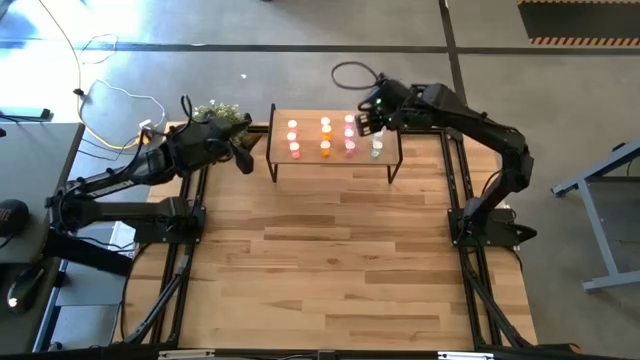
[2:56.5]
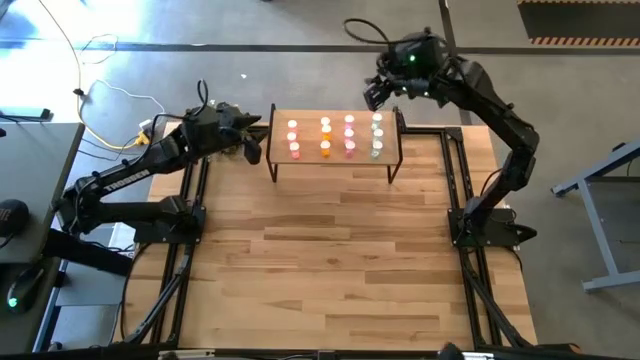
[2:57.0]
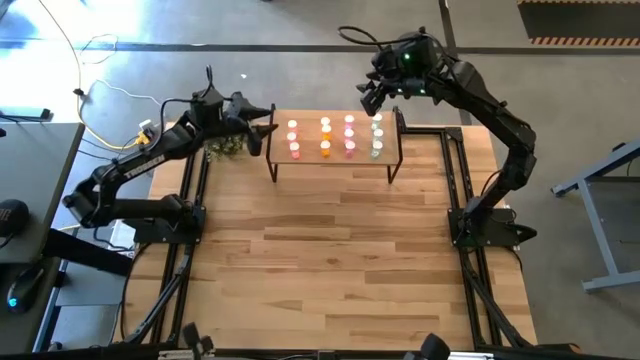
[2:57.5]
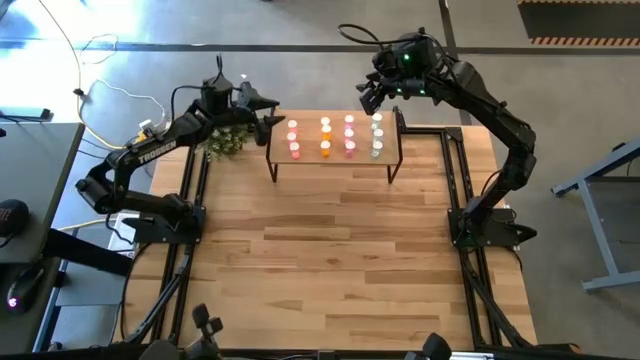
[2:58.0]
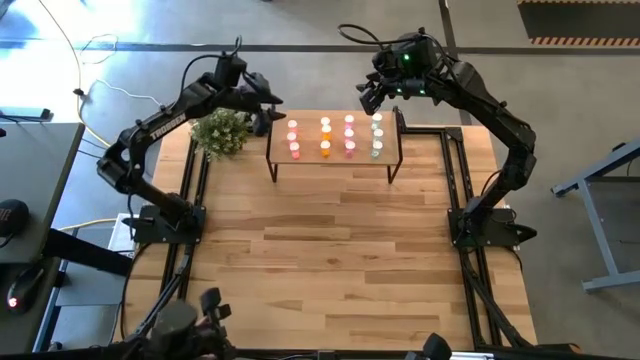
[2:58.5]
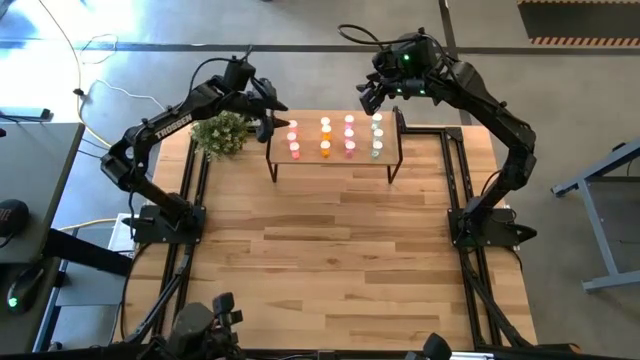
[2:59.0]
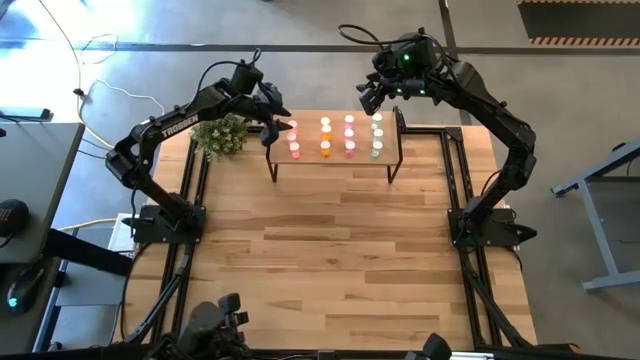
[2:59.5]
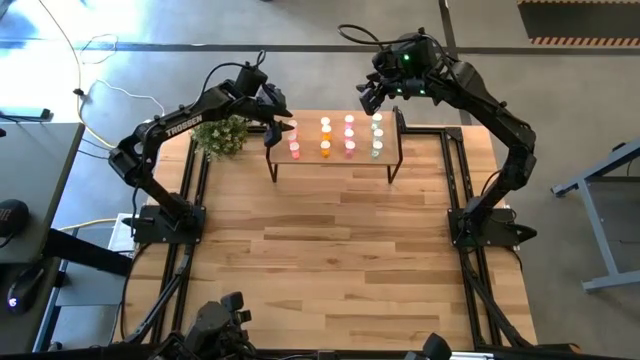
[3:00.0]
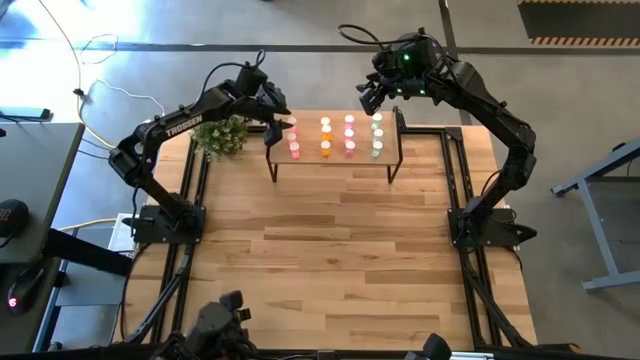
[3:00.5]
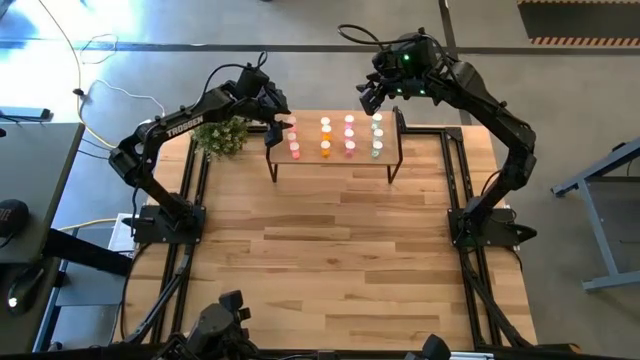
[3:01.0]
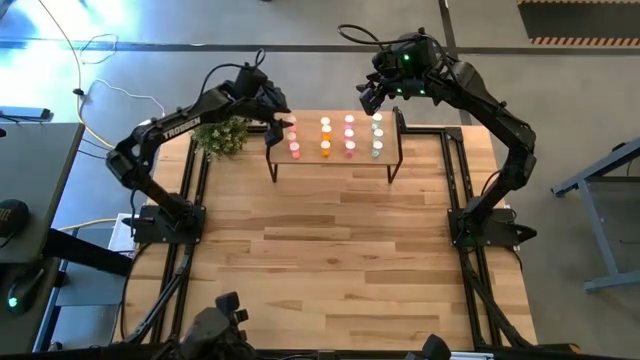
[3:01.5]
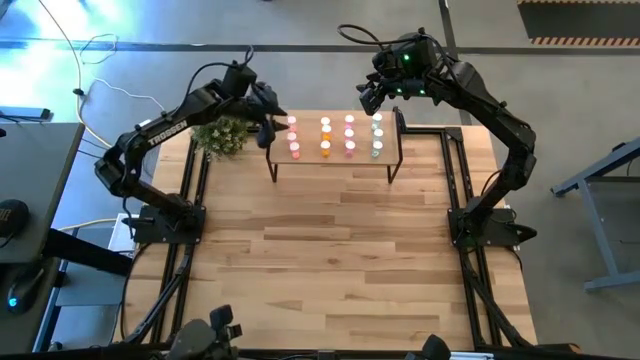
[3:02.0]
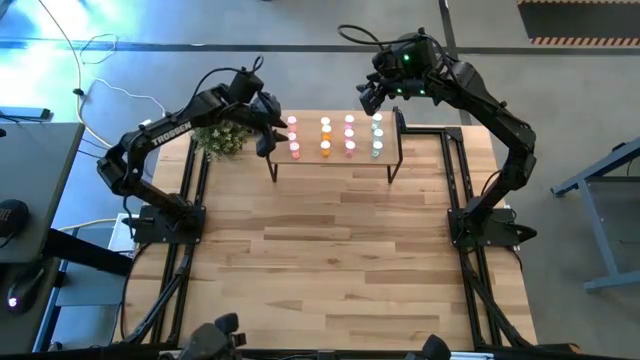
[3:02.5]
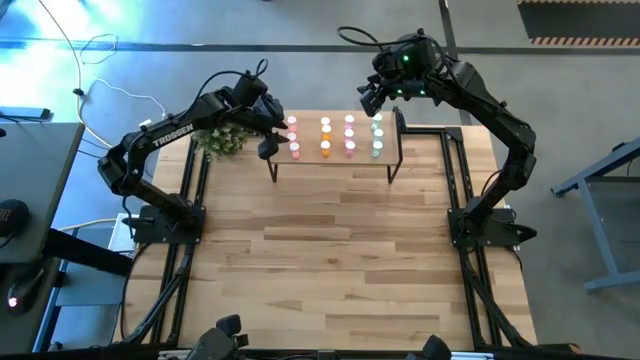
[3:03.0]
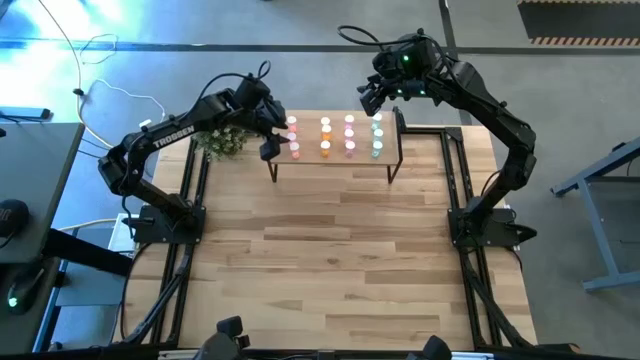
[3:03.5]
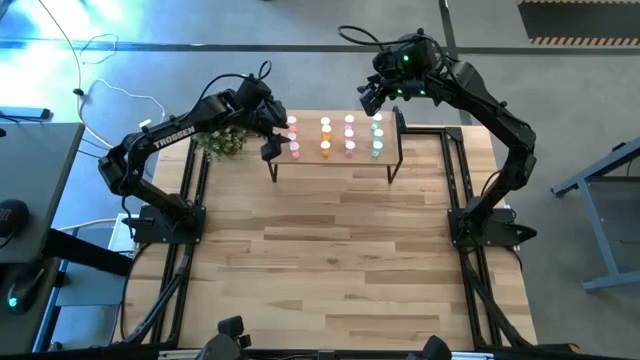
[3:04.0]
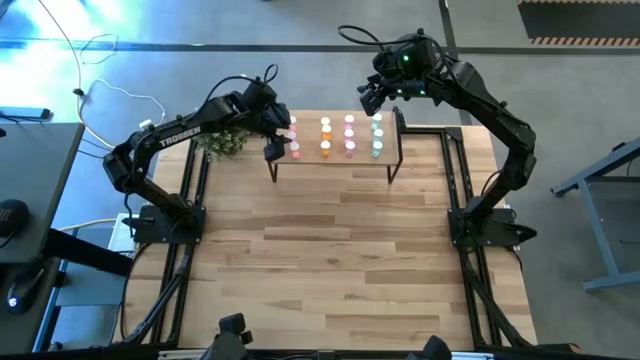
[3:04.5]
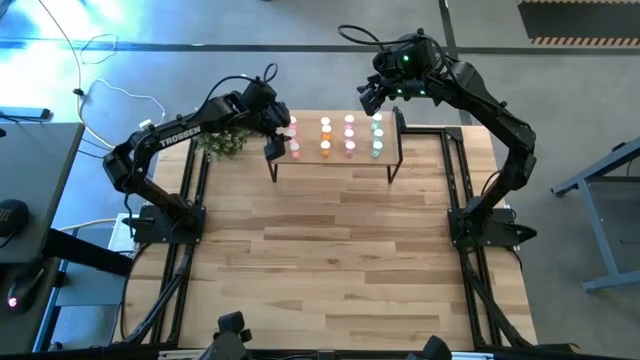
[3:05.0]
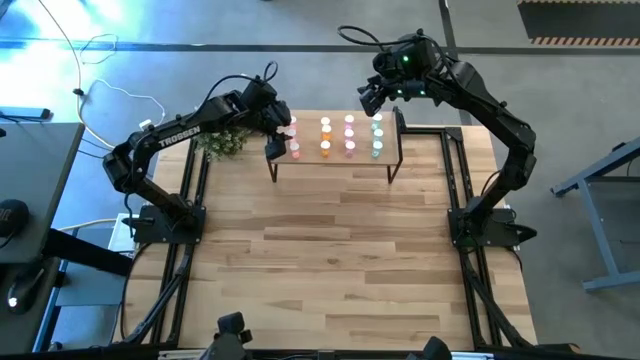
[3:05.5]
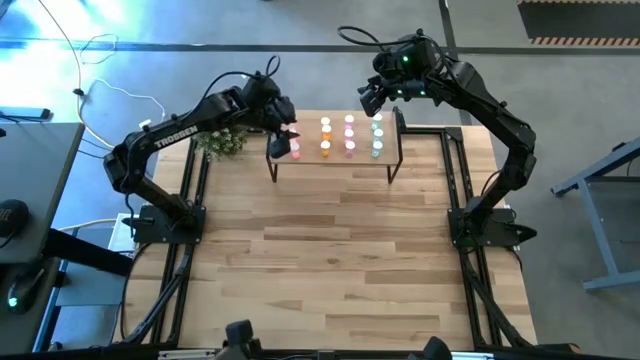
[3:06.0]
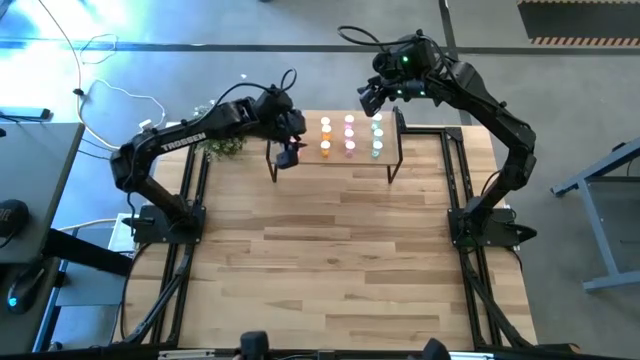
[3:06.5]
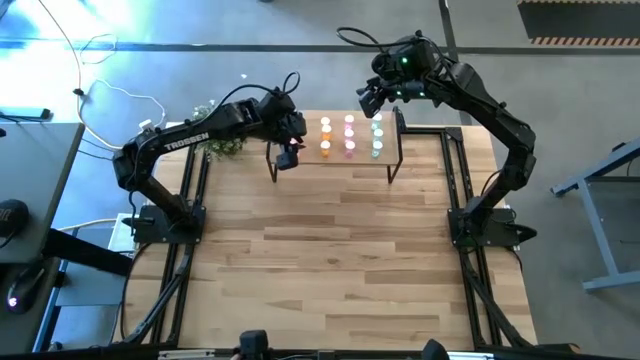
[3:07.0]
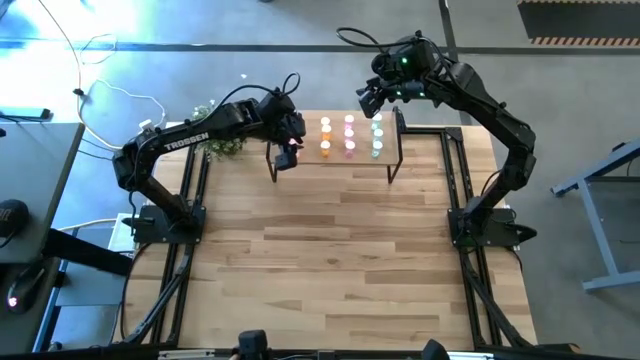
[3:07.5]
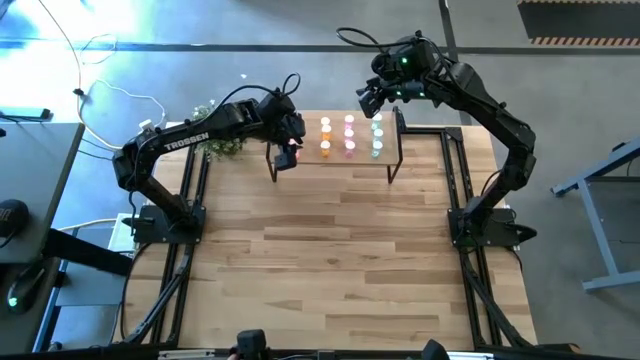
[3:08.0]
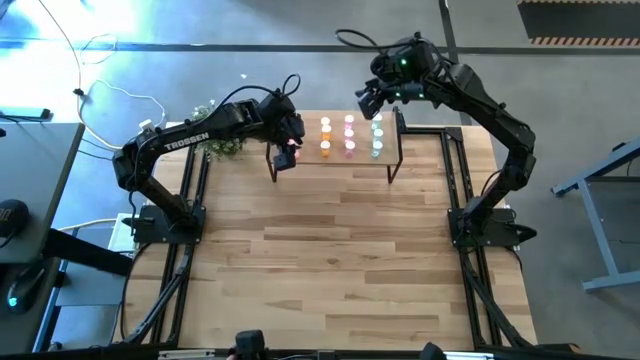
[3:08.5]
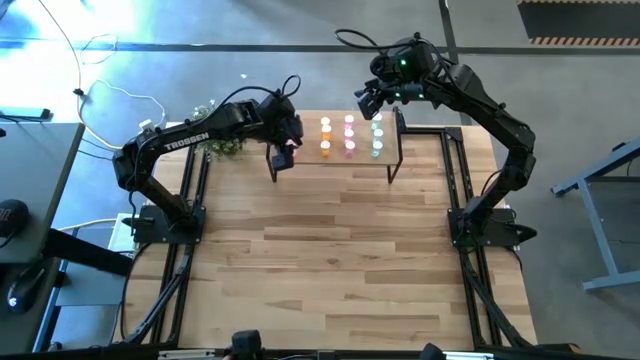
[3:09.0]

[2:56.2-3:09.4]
Task: Pick and place medicine bottles onto shelf by color
Adjust the pink pill bottles on the shelf

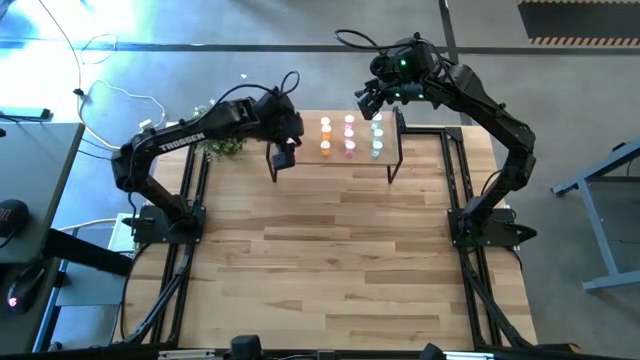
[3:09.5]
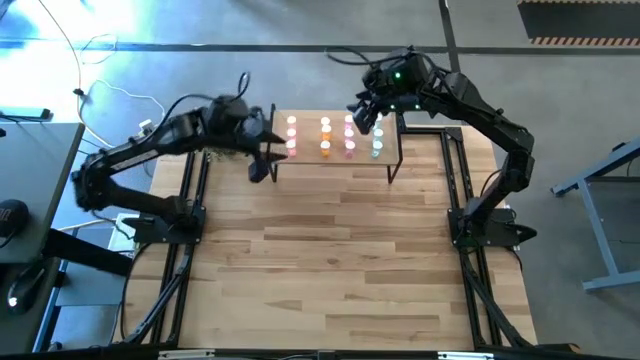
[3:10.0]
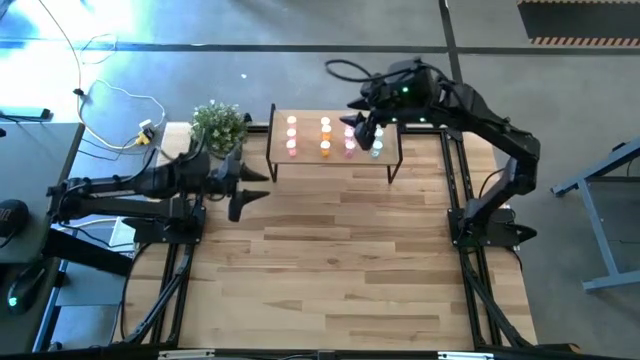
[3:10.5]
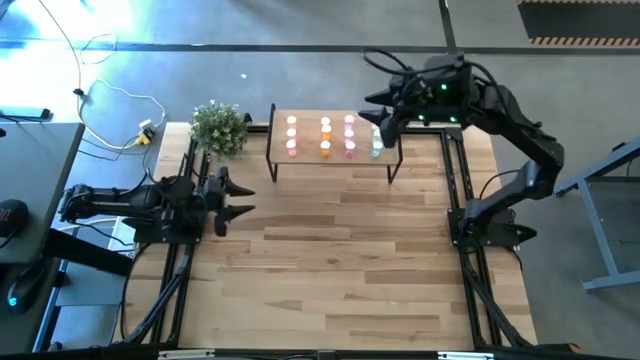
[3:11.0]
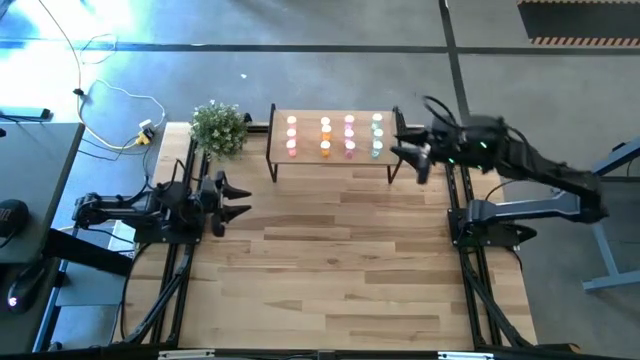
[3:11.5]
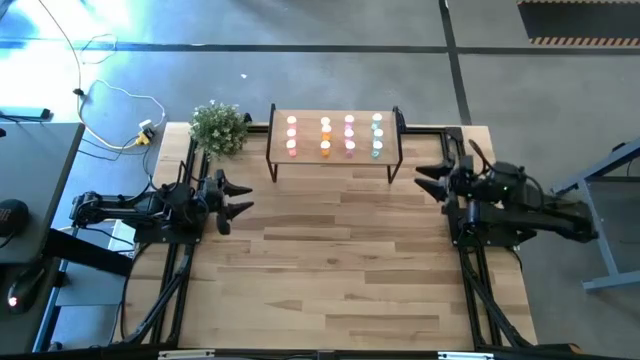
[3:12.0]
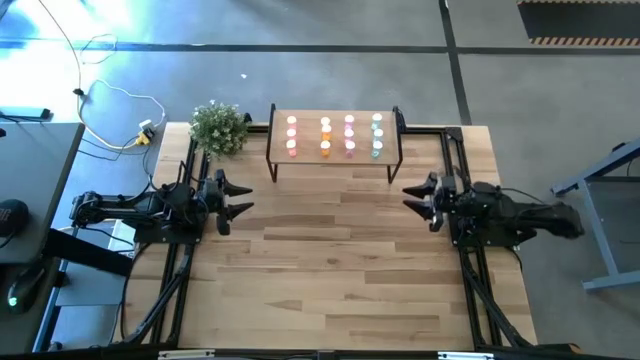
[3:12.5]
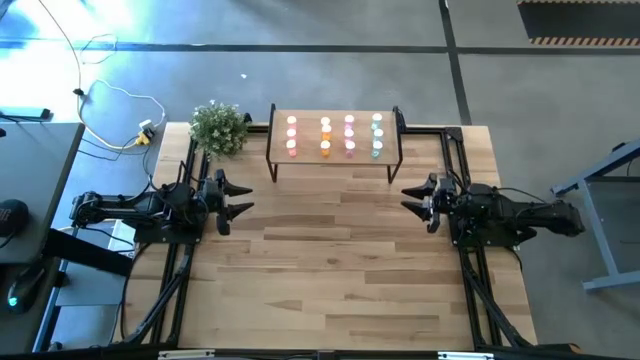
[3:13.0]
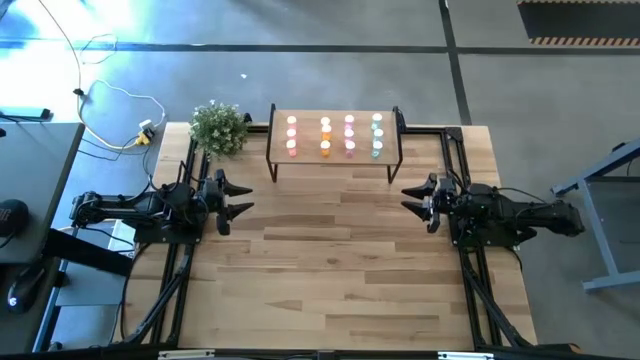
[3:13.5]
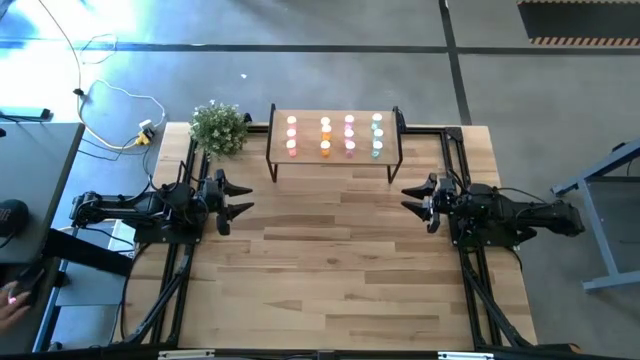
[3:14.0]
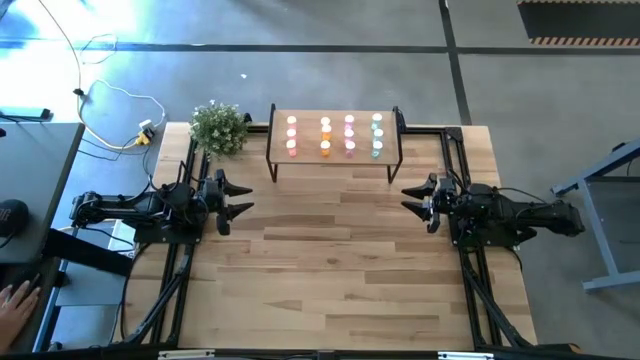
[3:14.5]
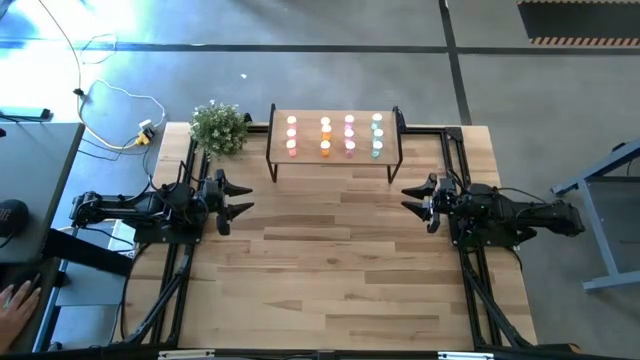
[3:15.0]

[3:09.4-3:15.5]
Return to Home Position

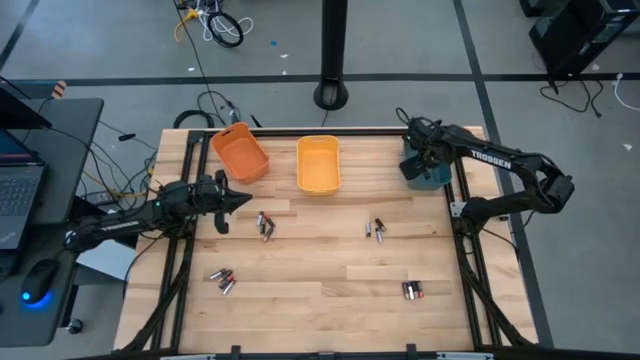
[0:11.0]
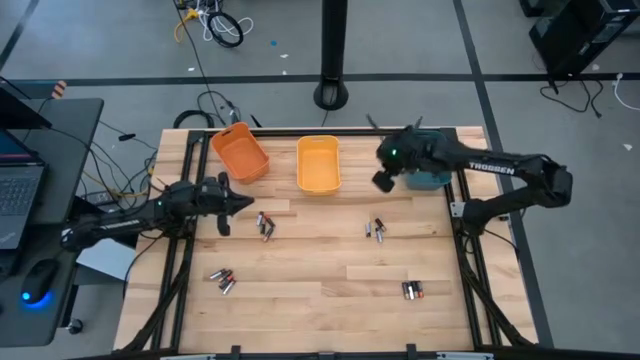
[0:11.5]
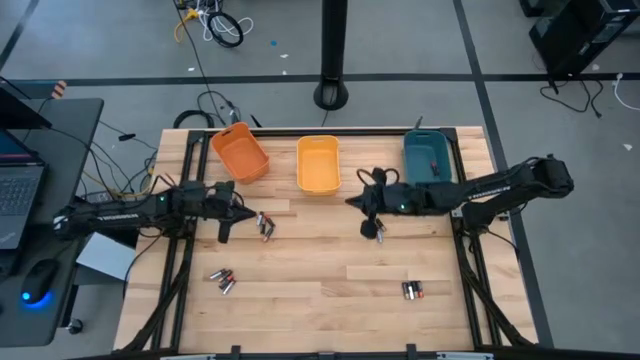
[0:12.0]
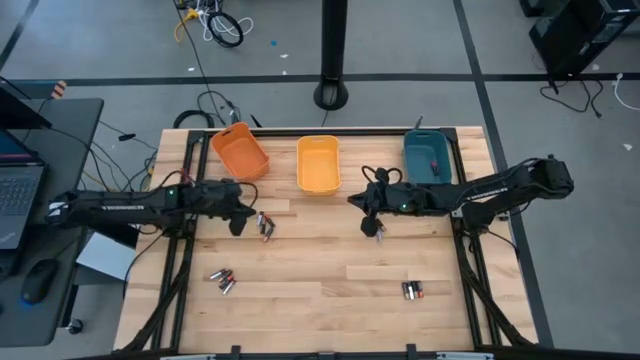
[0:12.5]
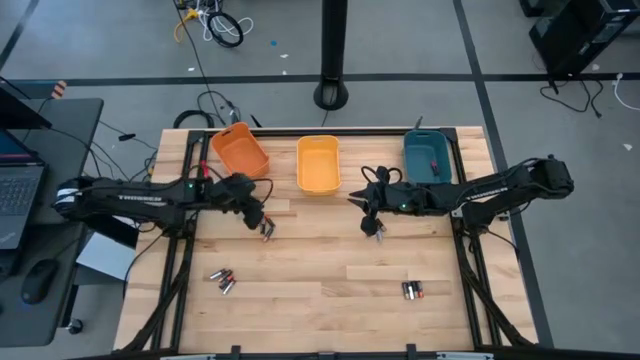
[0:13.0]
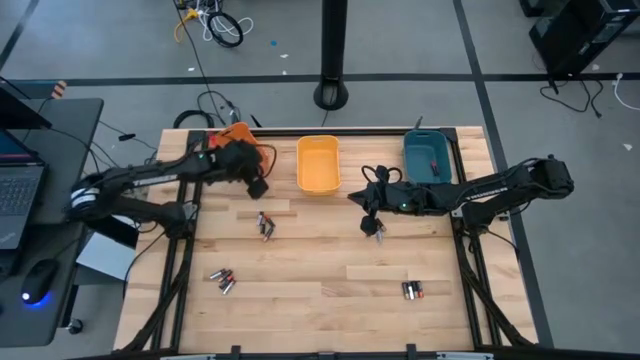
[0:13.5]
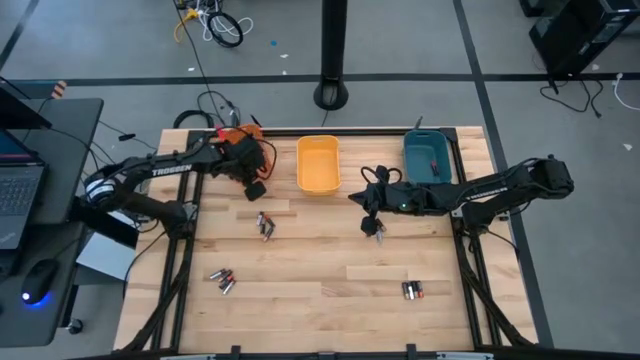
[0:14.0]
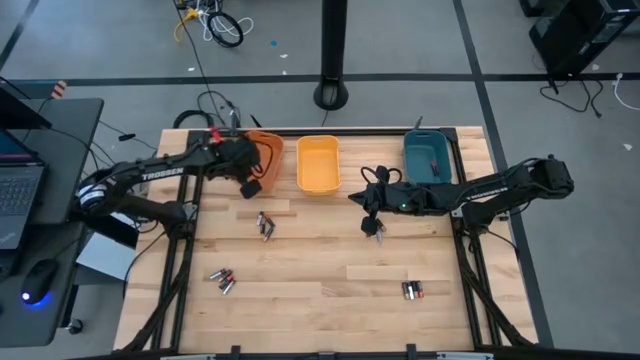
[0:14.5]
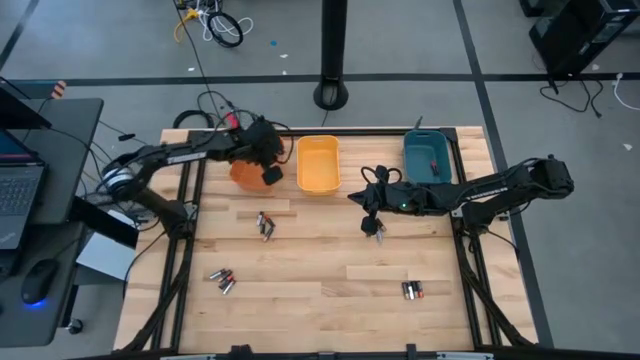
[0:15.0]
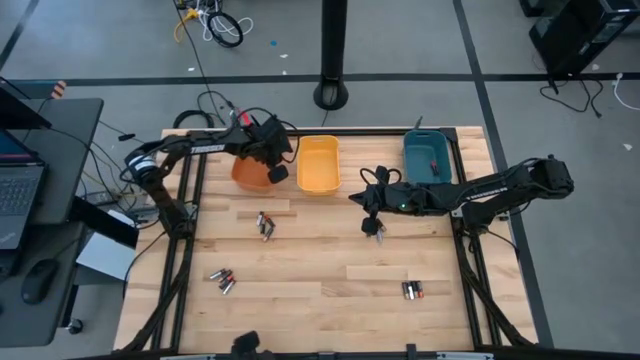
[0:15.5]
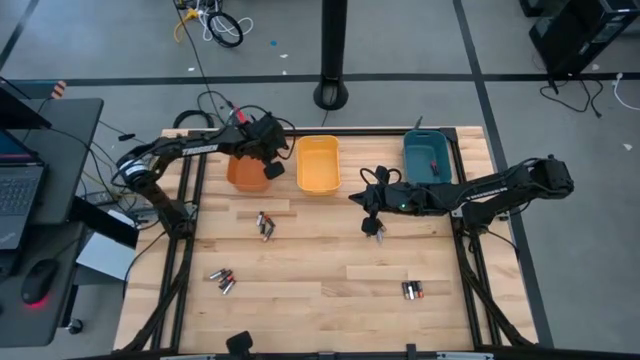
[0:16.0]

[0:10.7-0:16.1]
Task: Sort batteries
Adjust the orange bin
